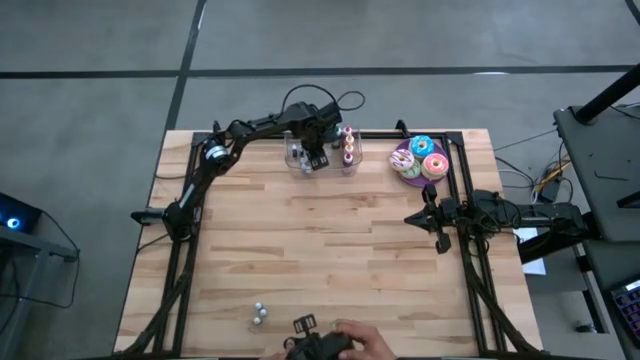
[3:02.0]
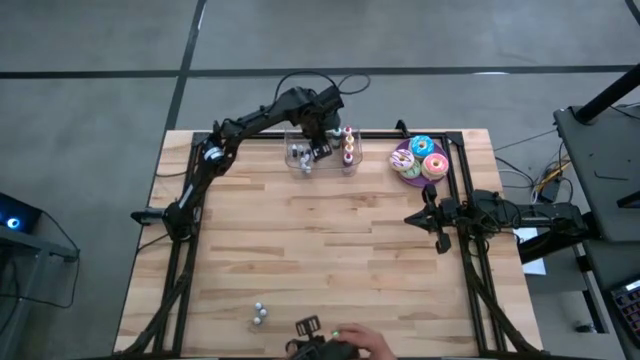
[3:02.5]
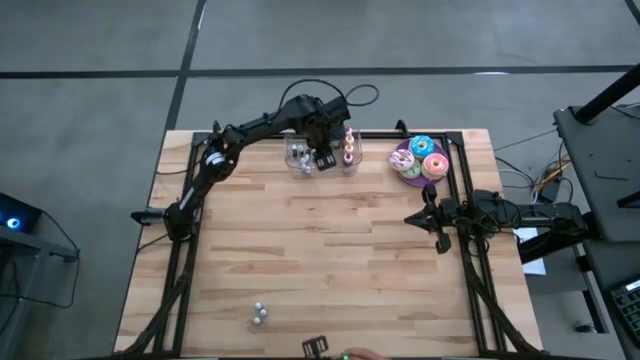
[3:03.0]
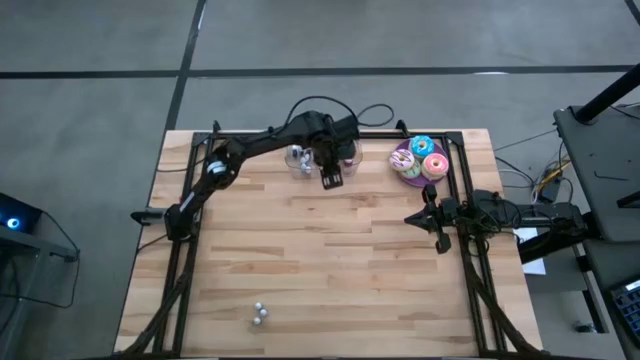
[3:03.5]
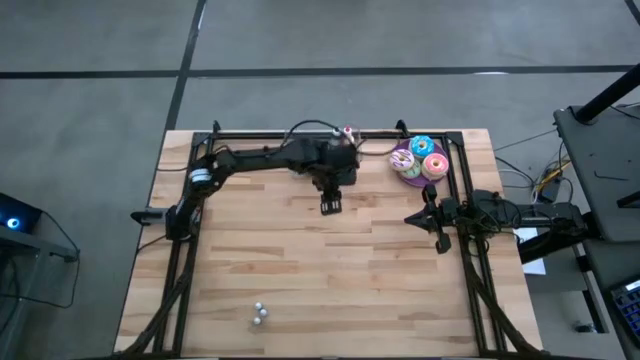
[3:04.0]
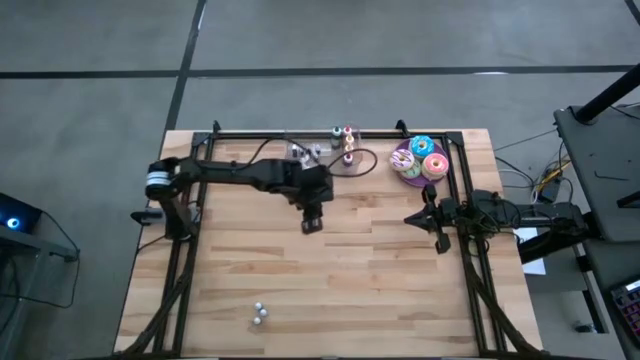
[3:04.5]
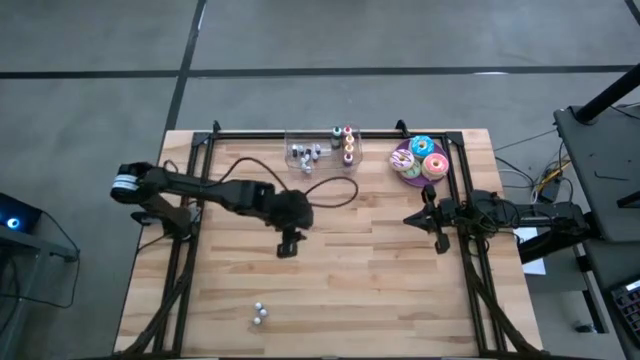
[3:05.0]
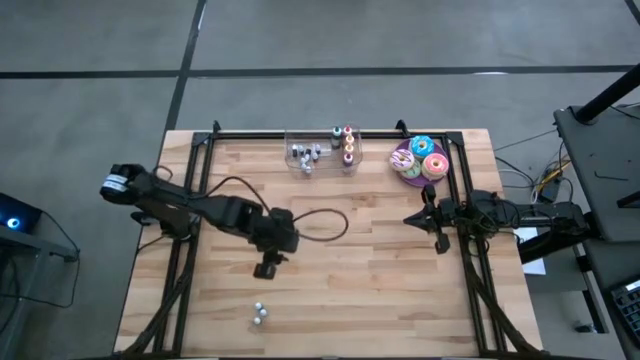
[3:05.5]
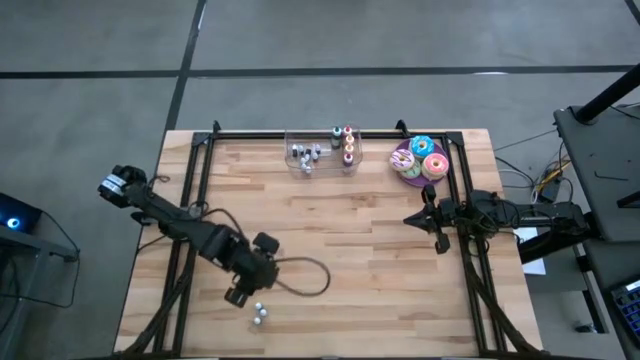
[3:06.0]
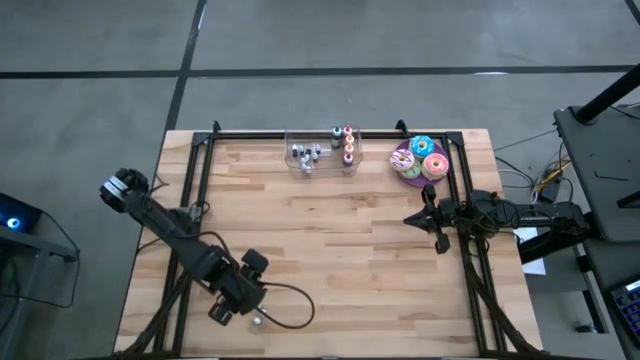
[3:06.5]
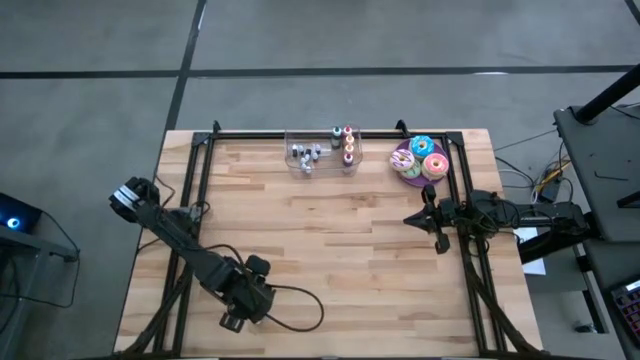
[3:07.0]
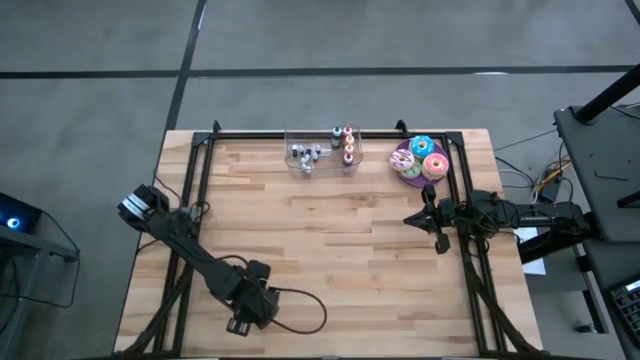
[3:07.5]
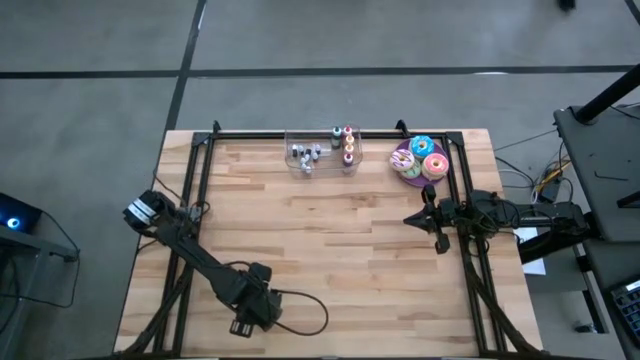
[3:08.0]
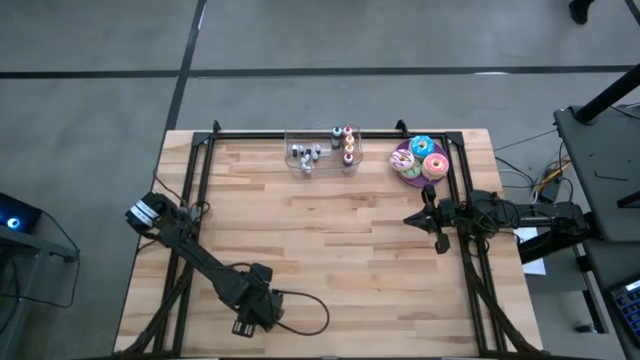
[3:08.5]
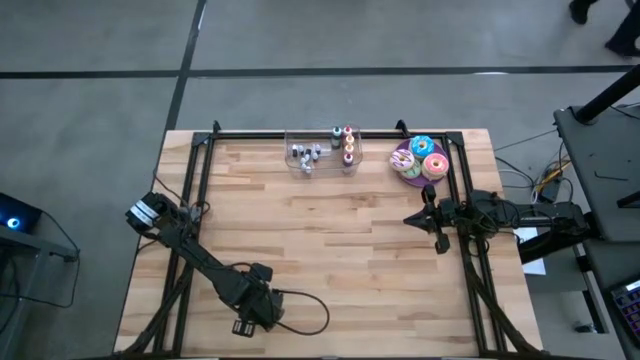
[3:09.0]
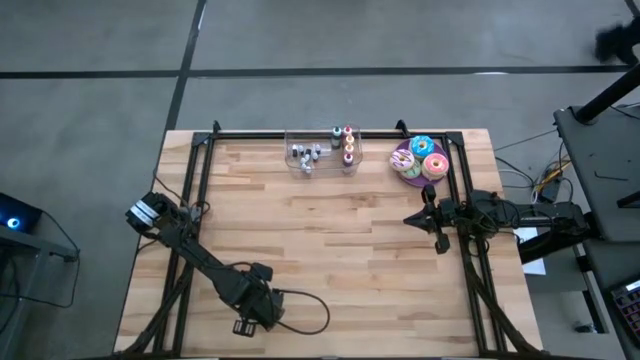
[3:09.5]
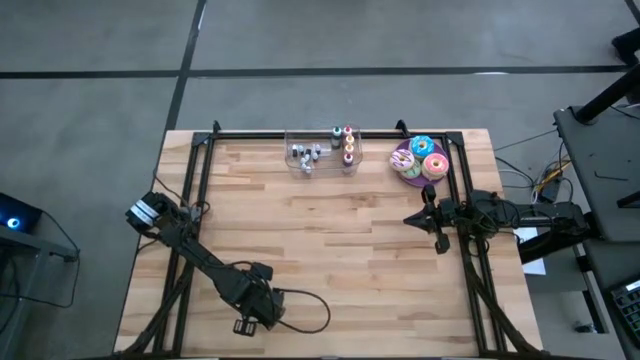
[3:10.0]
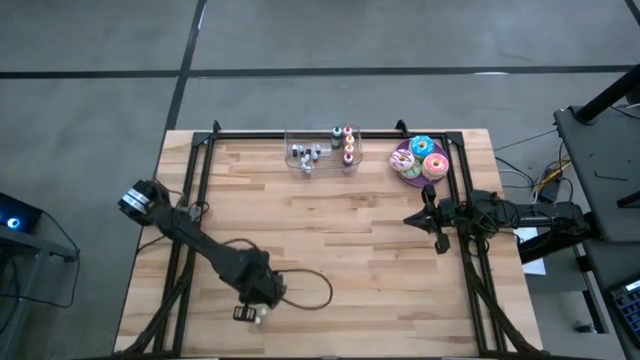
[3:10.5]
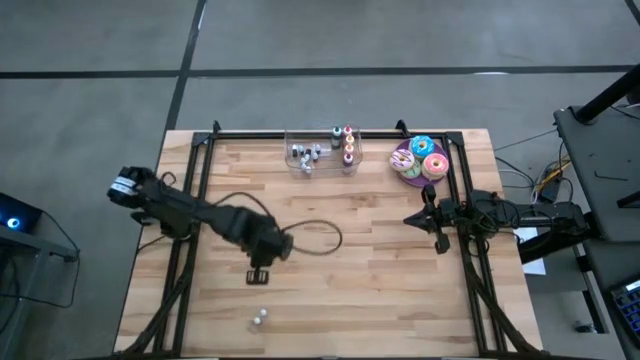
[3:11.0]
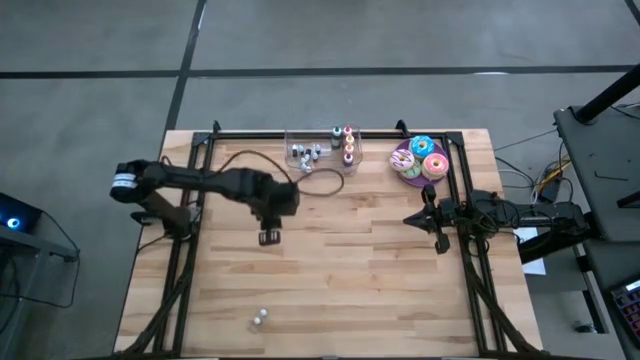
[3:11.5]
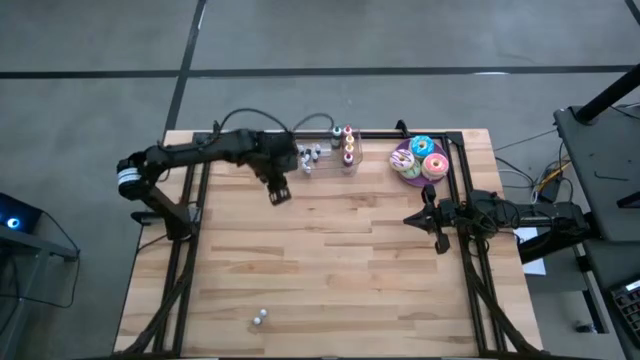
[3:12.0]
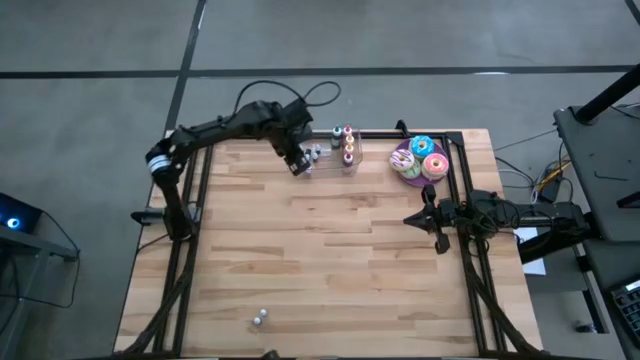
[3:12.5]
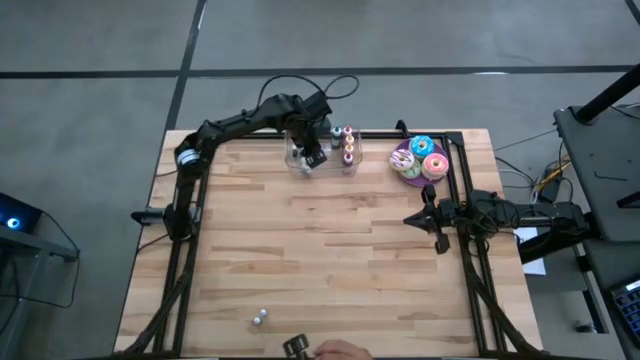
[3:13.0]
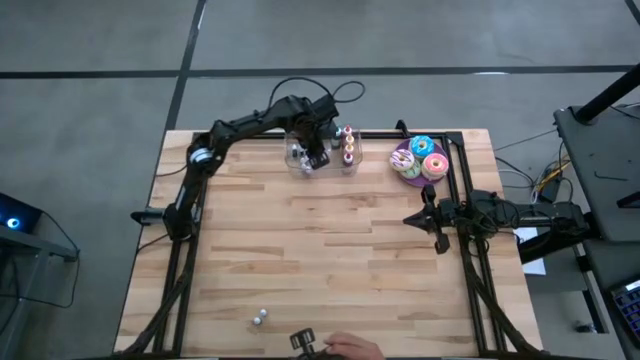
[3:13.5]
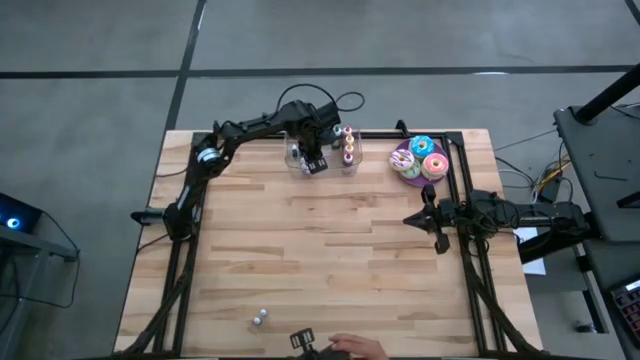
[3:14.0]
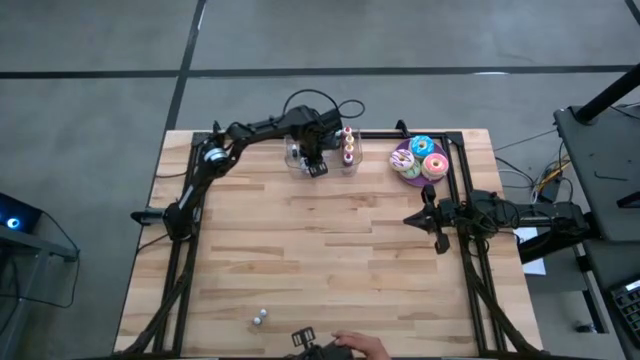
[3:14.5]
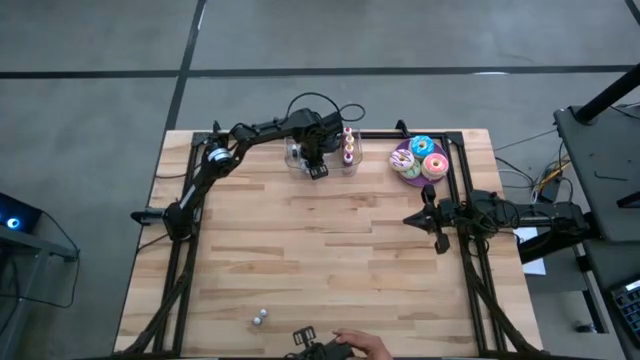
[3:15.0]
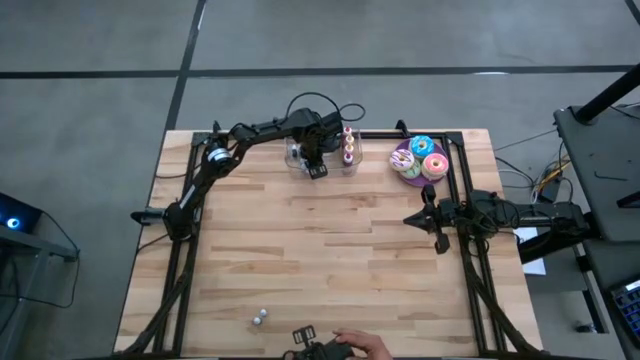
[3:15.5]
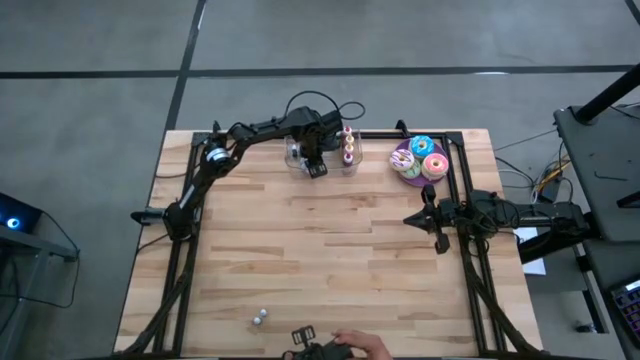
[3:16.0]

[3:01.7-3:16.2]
Task: Pick & Place food coloring
Put the top small green food coloring bottle into the transparent bin

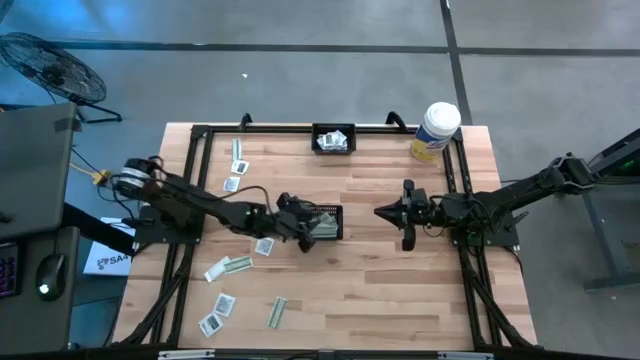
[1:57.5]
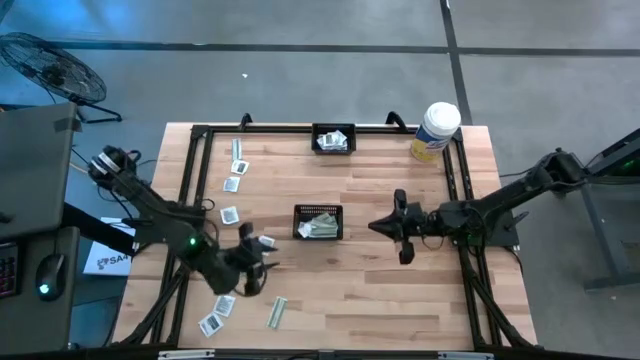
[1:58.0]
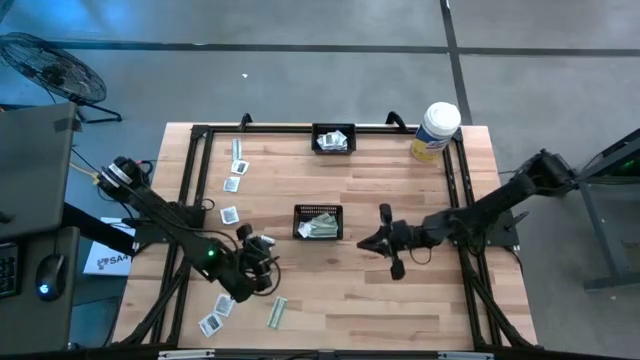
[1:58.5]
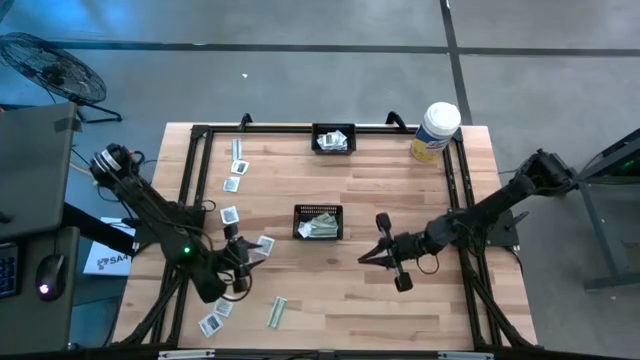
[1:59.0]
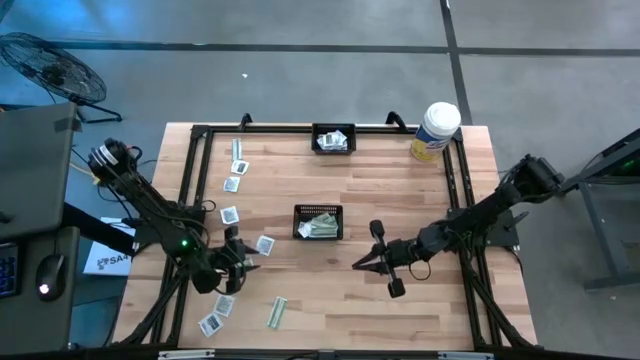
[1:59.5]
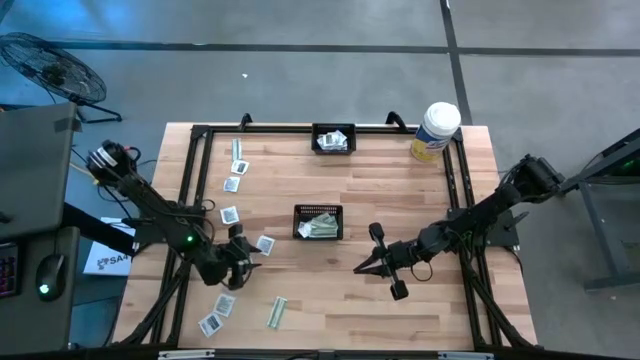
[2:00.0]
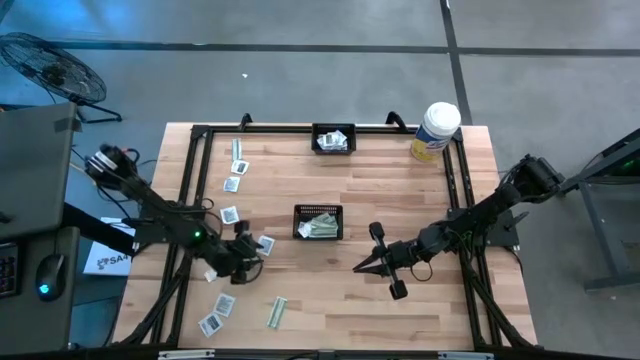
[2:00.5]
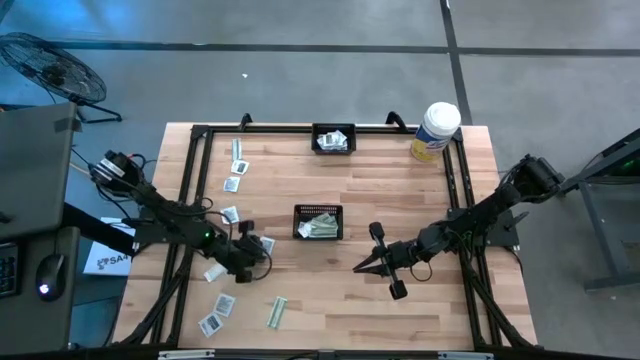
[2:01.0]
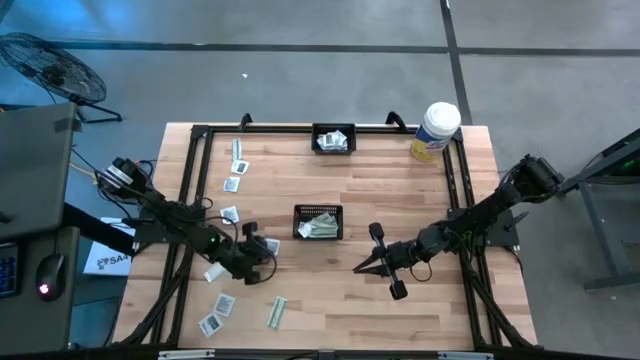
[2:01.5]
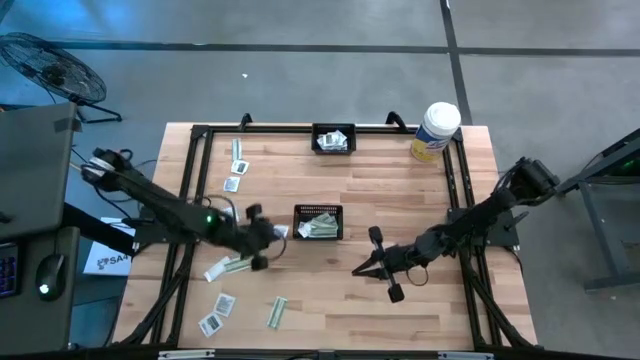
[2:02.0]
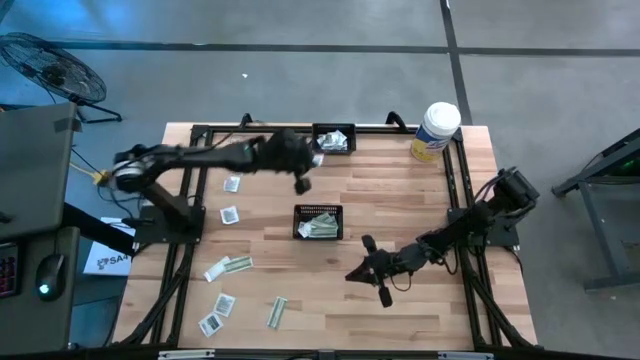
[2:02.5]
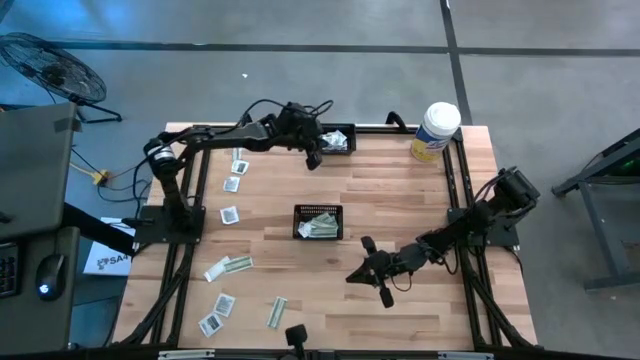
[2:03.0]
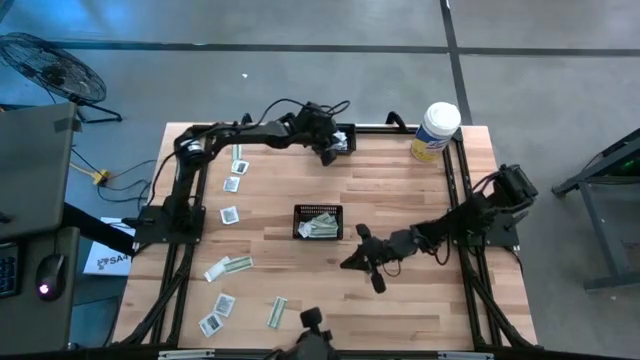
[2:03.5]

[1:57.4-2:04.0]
Task: Pick & Place First Aid Supplies
Put the towelette pack into the top black basket
